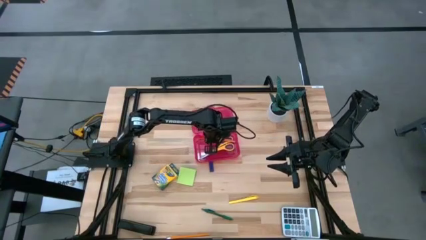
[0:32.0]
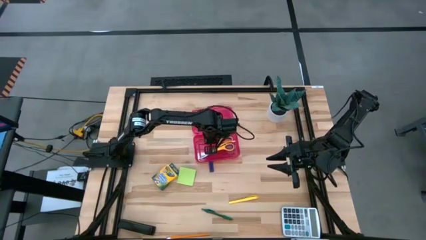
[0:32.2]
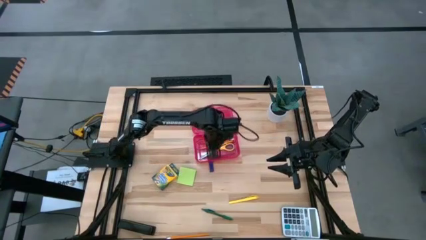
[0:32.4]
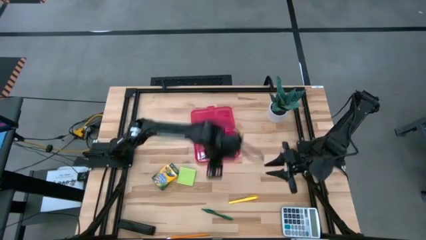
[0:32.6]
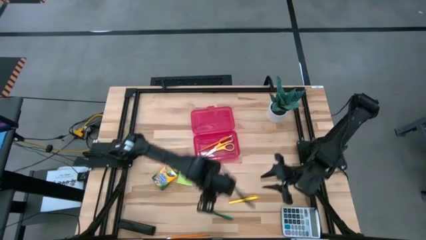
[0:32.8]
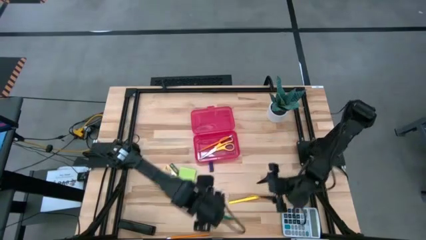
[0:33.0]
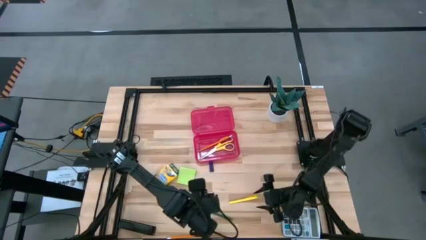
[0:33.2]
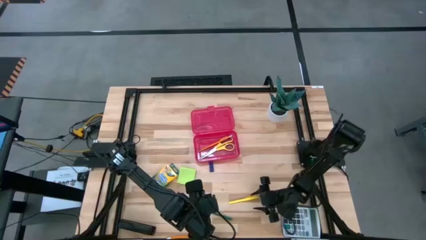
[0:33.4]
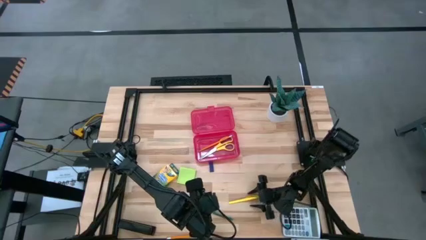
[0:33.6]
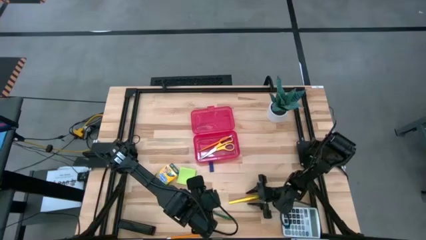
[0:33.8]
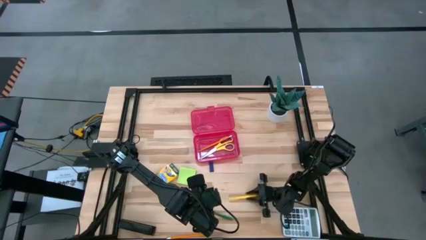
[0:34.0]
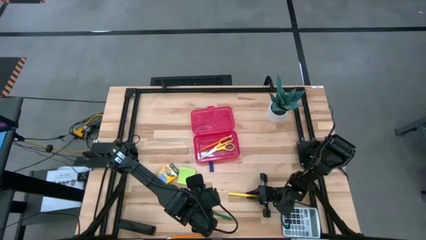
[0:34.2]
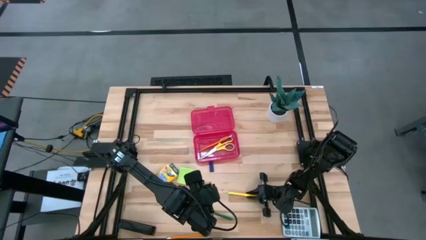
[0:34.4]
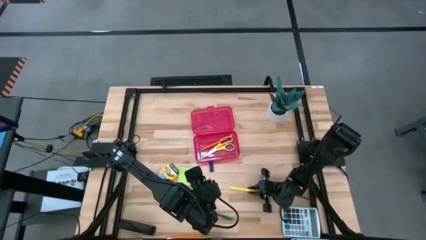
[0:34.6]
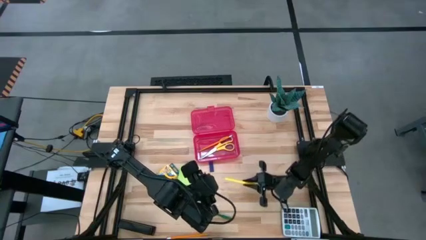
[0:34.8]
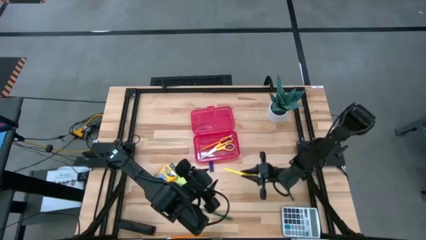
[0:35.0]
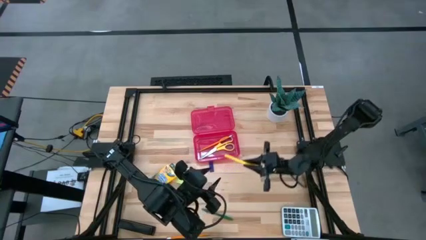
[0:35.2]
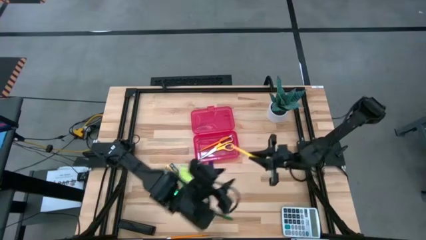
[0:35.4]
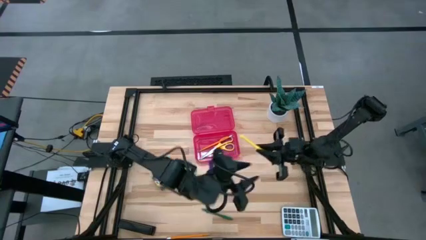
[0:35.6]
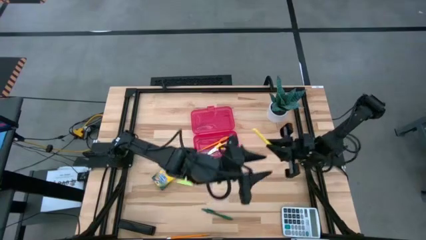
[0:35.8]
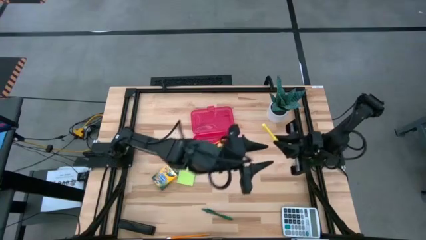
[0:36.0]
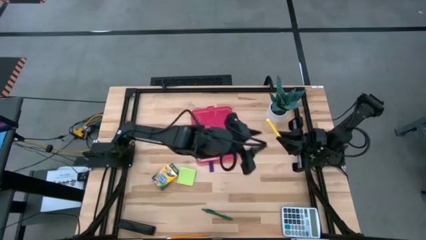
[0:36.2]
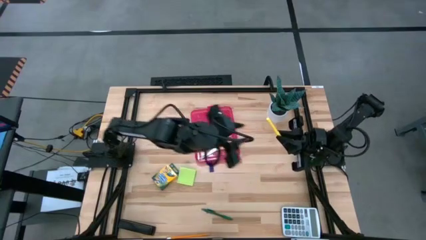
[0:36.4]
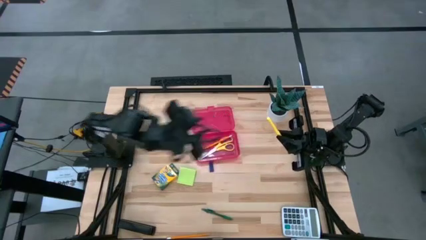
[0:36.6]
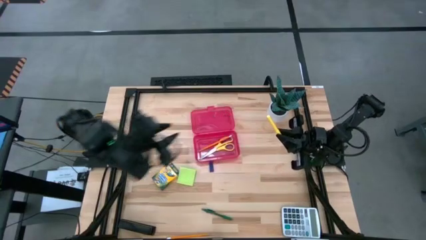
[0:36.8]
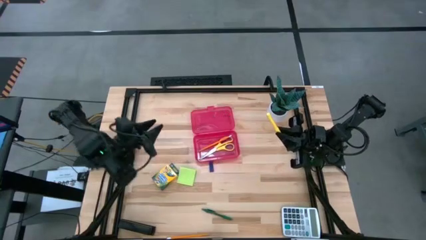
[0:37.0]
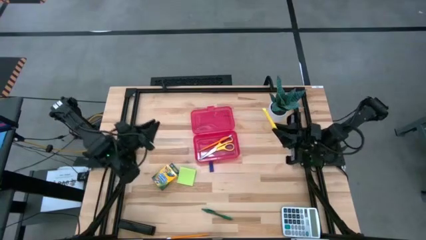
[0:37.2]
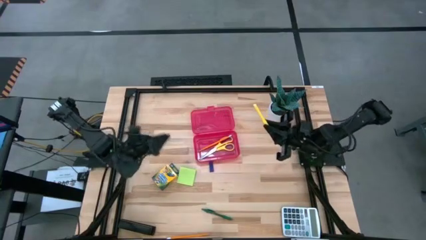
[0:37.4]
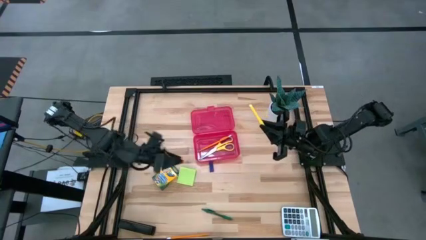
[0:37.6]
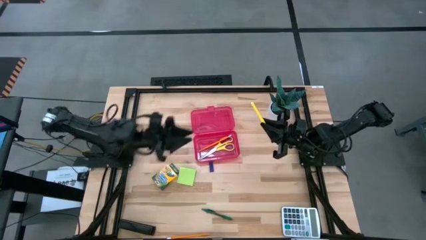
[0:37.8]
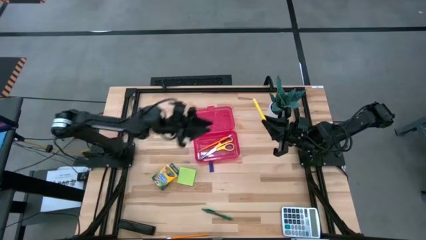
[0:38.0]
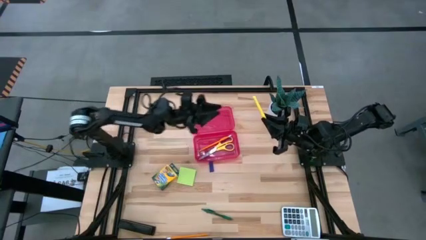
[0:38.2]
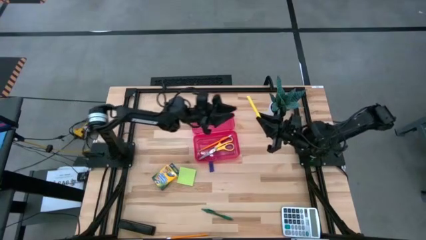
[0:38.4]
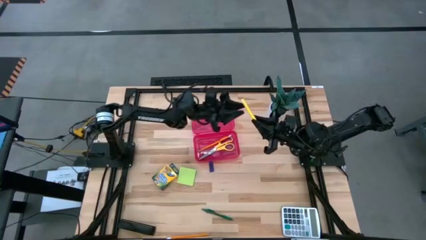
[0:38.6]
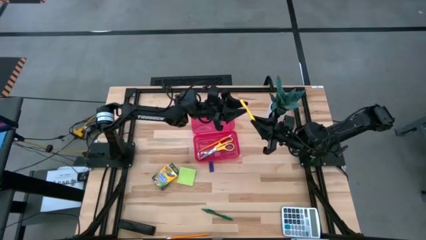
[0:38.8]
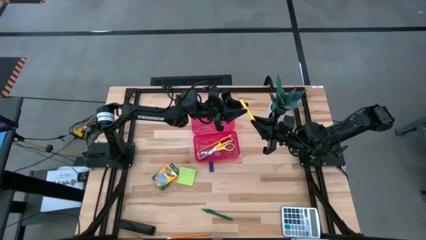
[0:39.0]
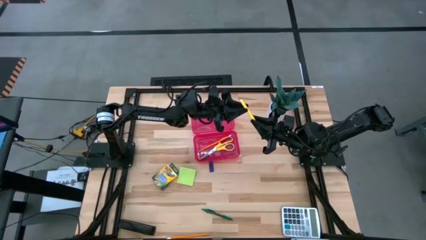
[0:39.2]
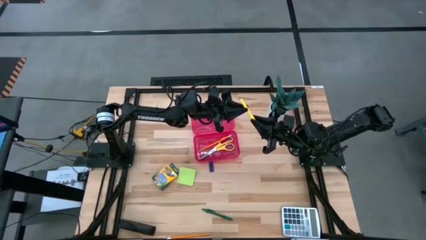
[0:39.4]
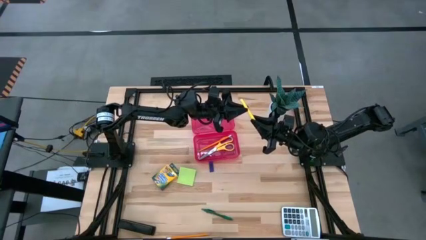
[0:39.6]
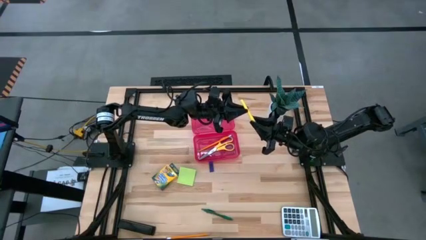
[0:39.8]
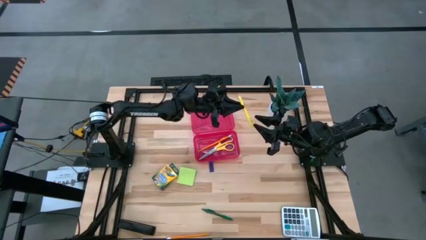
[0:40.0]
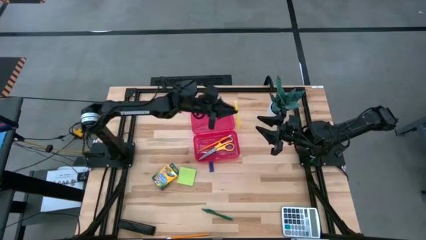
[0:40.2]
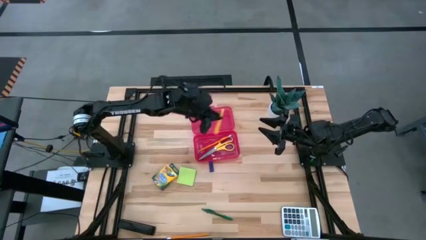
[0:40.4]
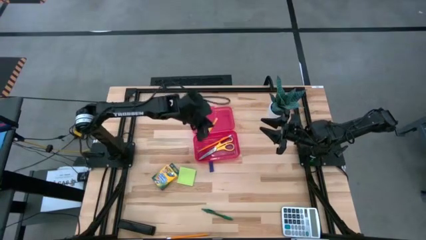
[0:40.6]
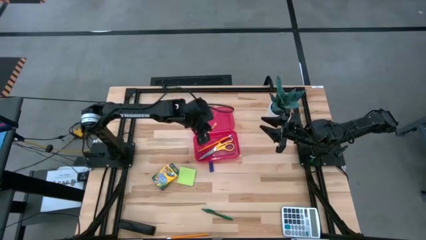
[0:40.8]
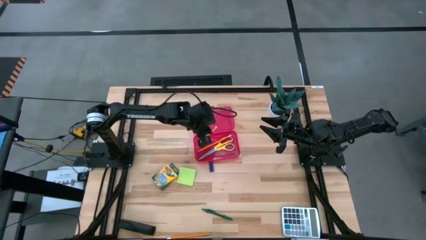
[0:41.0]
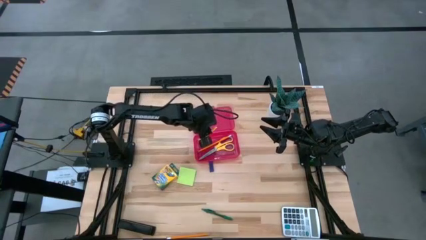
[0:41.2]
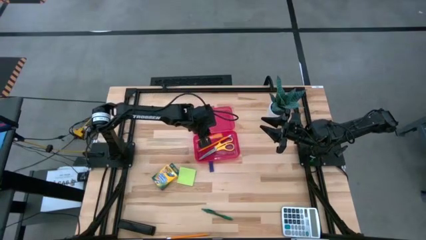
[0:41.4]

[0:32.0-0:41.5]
Task: Pack school essentials
Put the yellow marker into the supply box

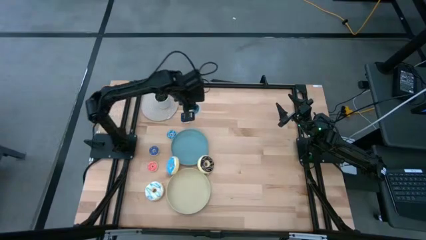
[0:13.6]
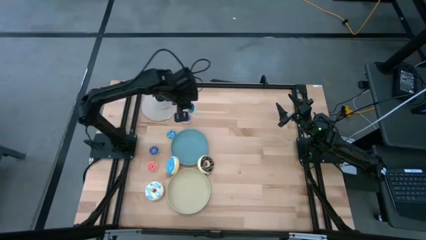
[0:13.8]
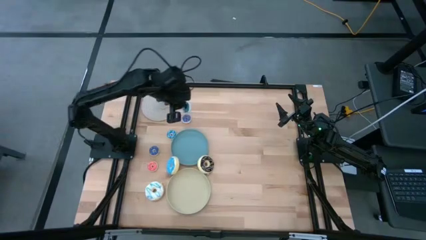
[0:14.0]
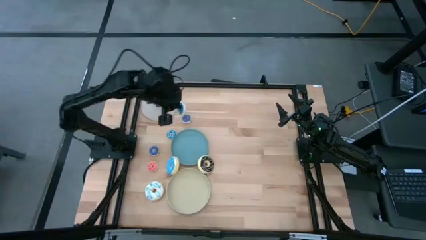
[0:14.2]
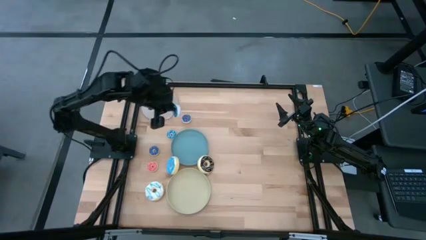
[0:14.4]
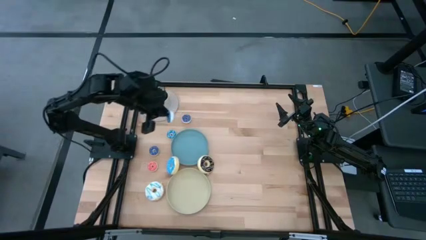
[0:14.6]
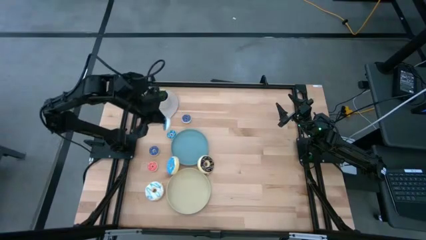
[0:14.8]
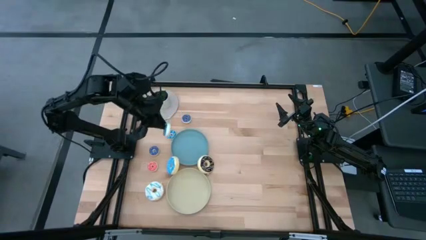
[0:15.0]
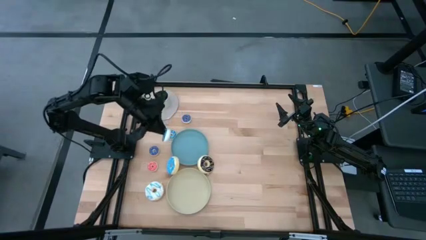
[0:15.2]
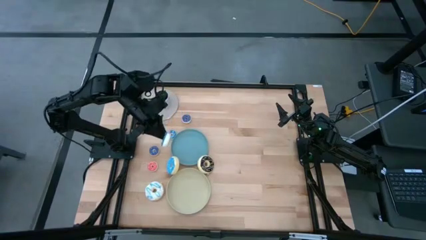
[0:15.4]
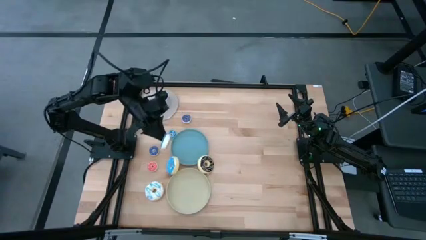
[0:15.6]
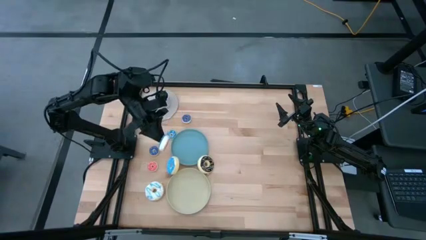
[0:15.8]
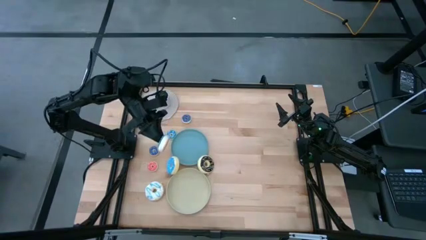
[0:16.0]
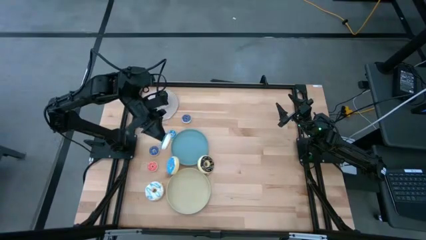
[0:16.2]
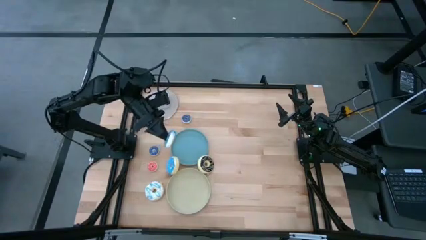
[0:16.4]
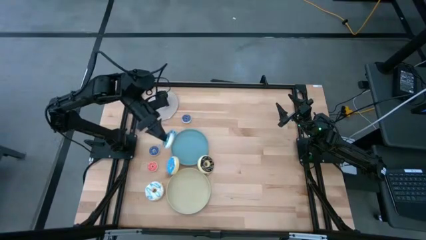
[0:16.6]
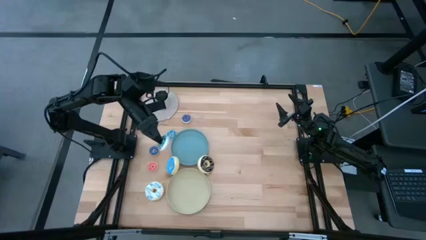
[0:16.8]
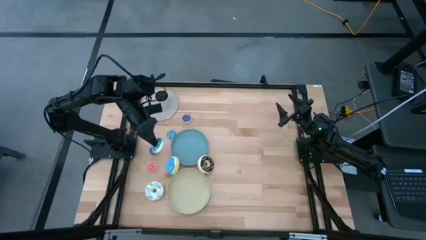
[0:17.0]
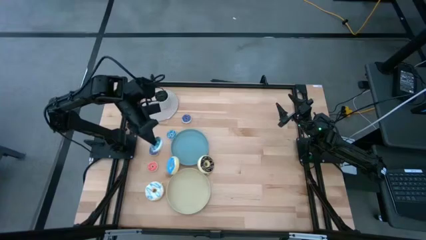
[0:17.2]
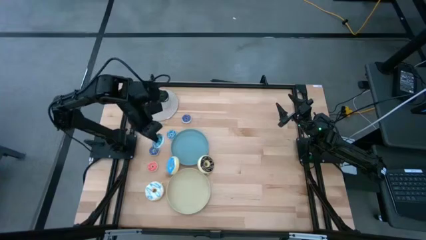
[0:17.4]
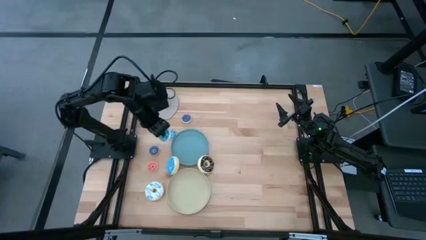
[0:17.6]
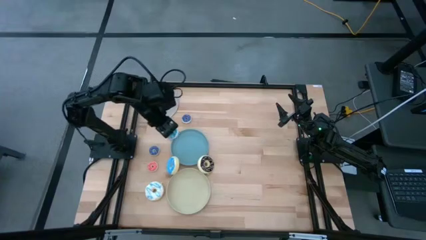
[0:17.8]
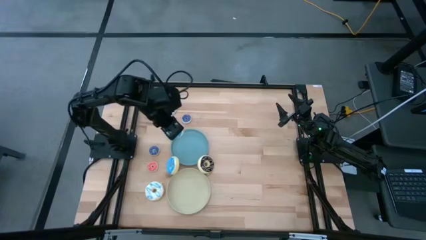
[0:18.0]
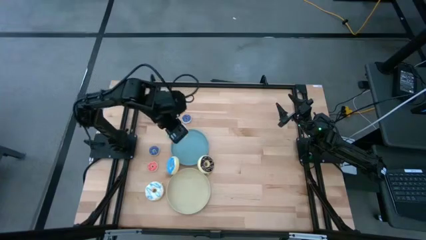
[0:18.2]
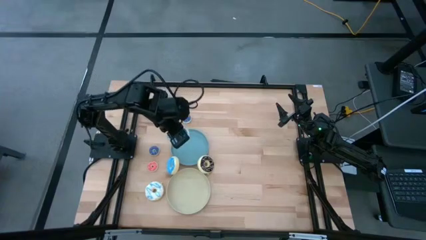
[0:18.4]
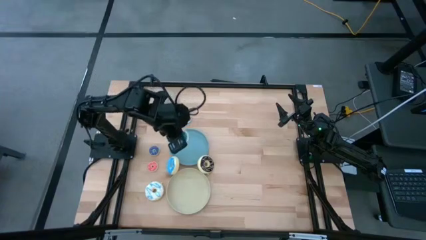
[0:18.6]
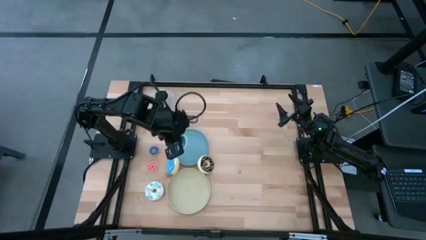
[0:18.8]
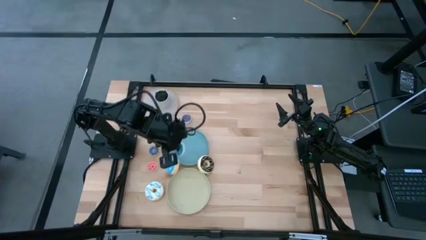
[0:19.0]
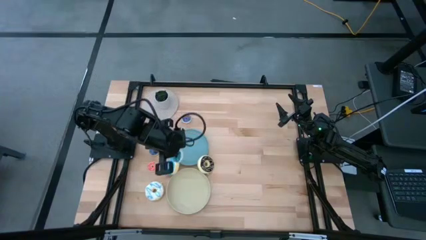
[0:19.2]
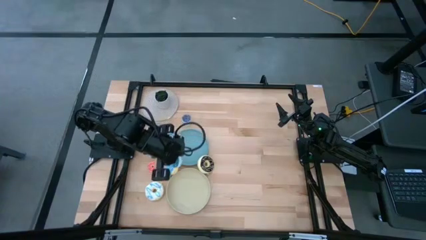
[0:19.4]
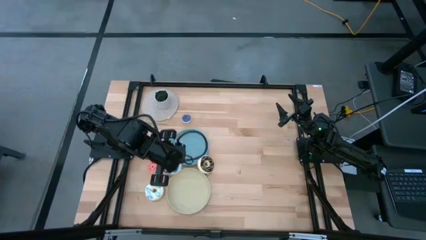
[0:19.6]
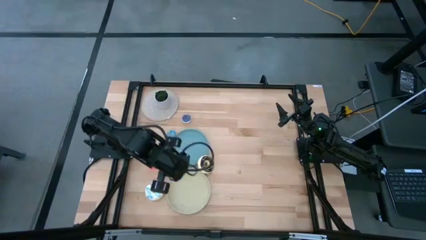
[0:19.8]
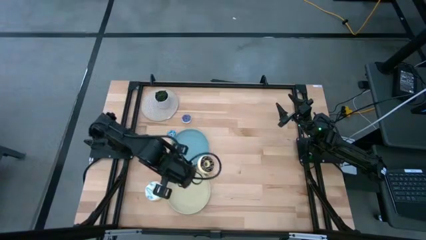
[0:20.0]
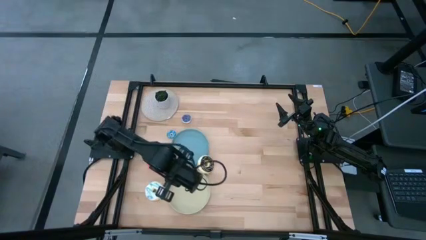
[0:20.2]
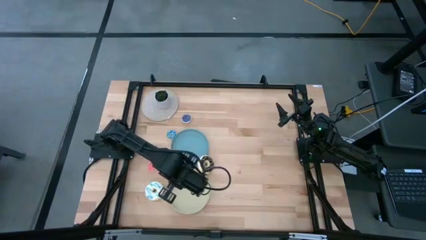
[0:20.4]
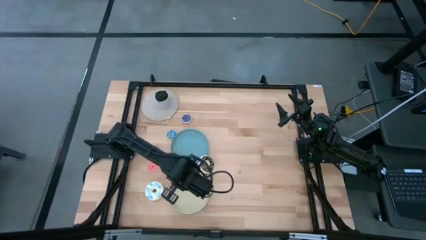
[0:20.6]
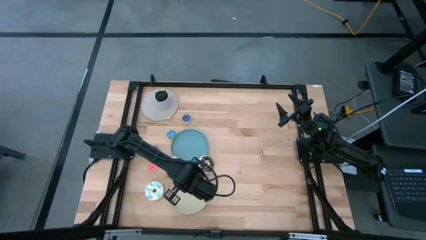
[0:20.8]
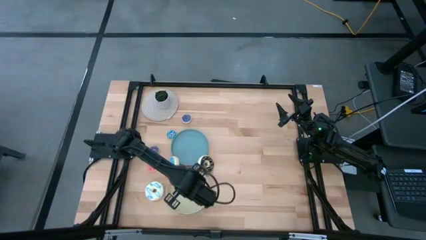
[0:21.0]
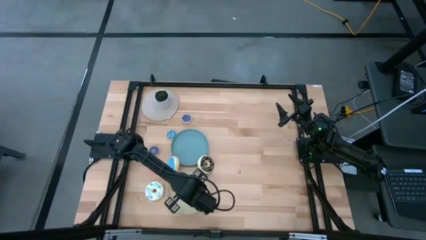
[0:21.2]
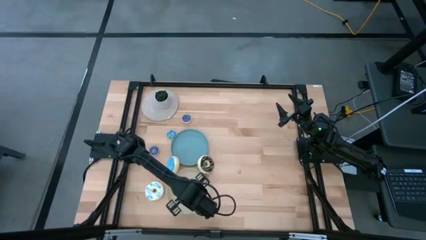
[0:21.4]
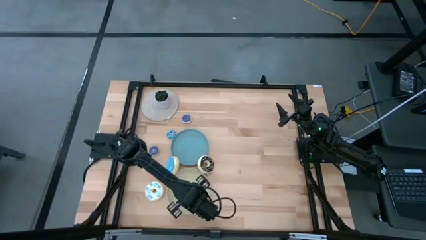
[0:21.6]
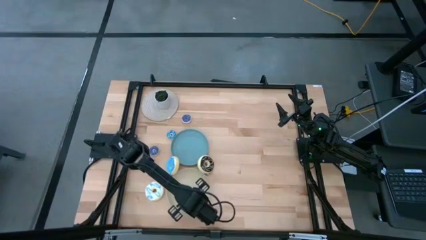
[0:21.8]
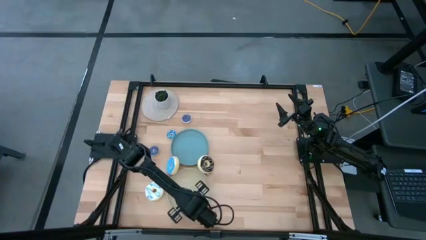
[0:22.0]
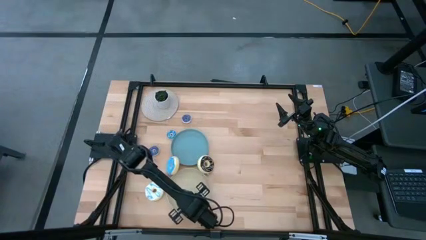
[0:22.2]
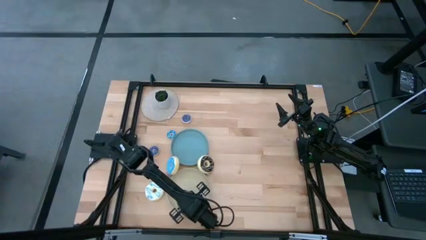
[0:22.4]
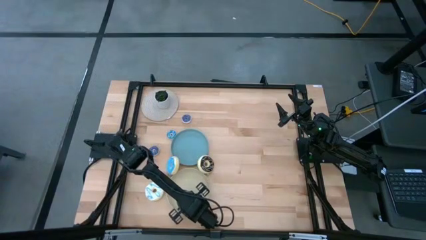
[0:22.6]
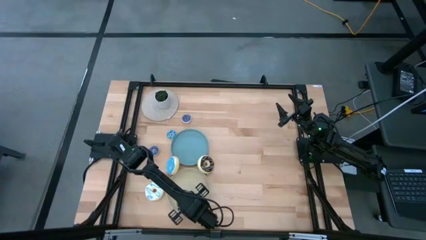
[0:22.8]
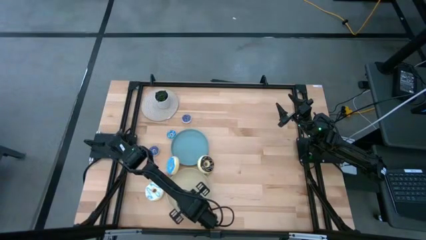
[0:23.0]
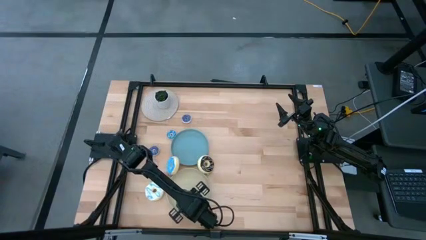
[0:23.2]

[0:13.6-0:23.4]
Task: Pick & Place donuts
Put the right small light blue donut on the gray plate
